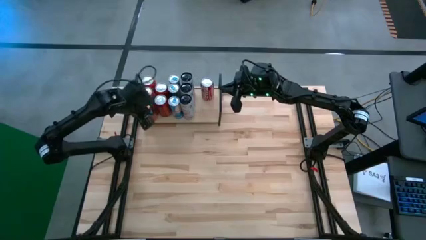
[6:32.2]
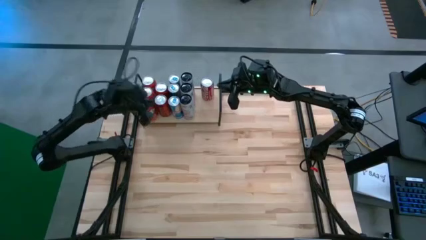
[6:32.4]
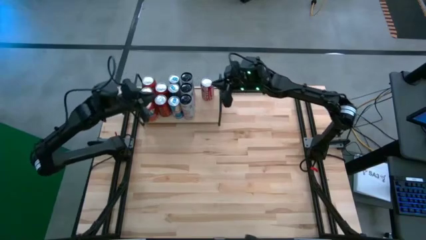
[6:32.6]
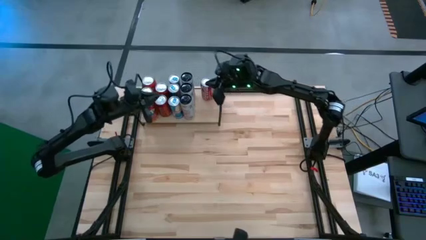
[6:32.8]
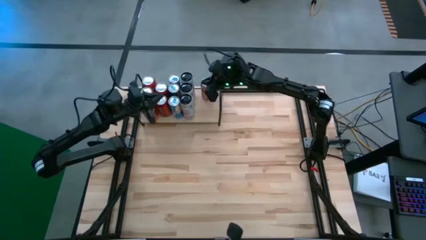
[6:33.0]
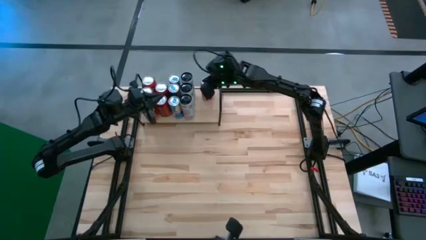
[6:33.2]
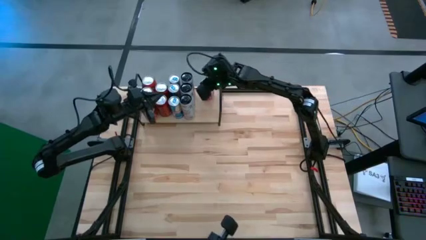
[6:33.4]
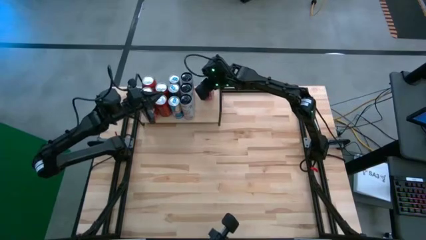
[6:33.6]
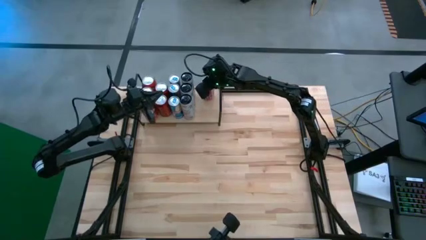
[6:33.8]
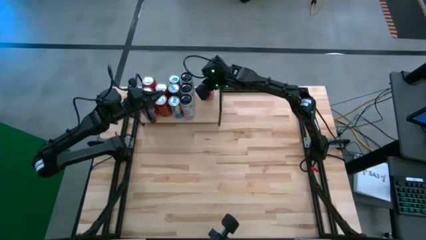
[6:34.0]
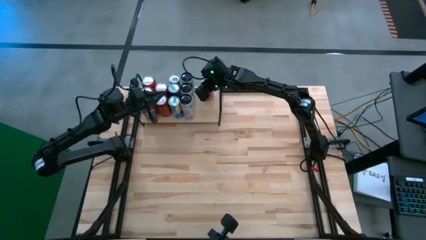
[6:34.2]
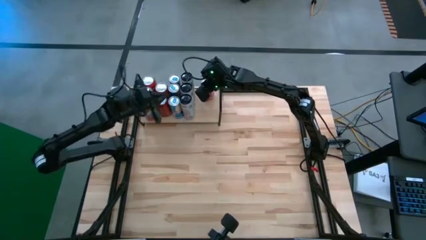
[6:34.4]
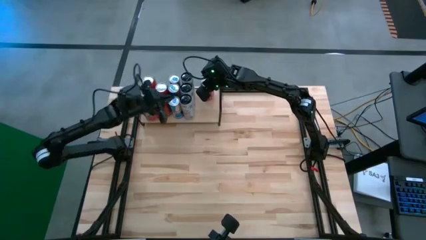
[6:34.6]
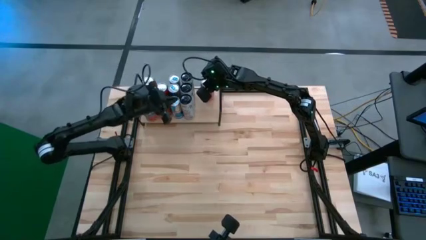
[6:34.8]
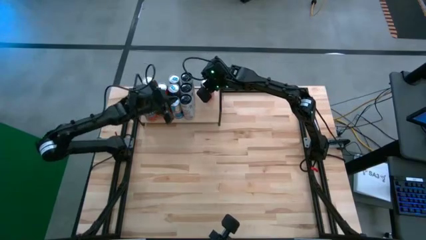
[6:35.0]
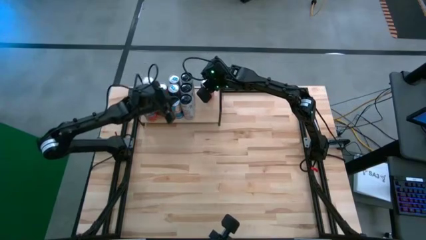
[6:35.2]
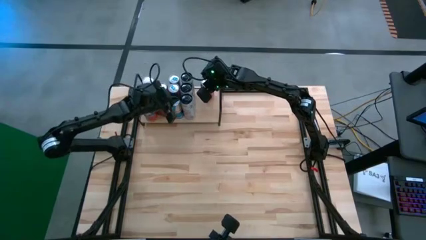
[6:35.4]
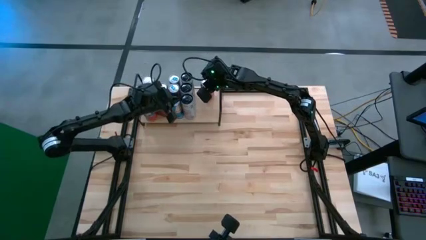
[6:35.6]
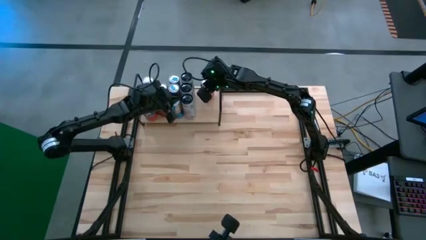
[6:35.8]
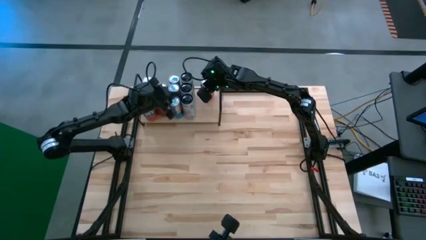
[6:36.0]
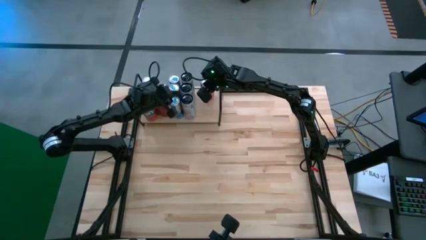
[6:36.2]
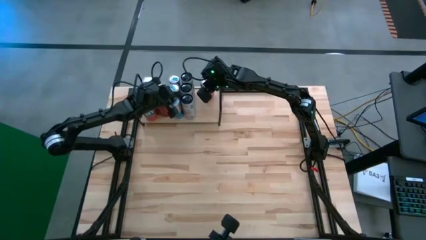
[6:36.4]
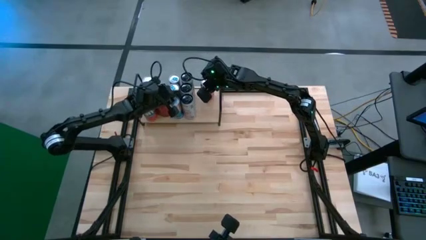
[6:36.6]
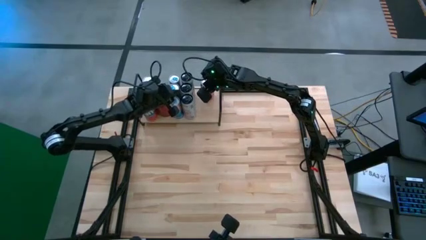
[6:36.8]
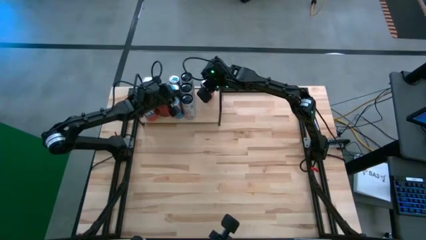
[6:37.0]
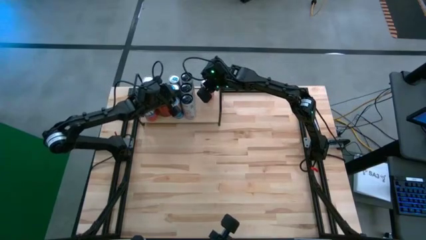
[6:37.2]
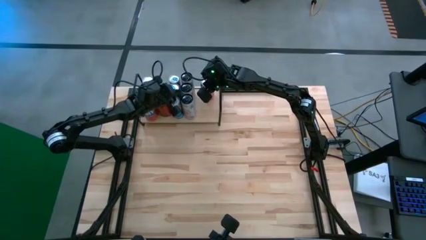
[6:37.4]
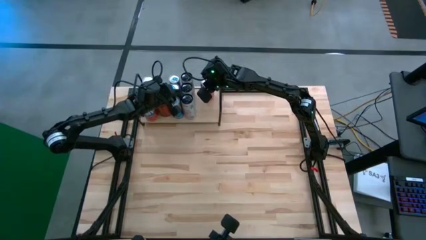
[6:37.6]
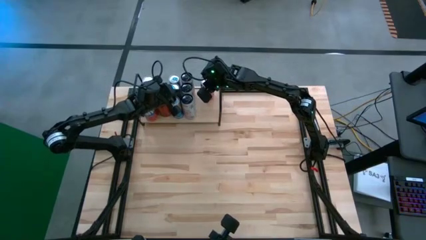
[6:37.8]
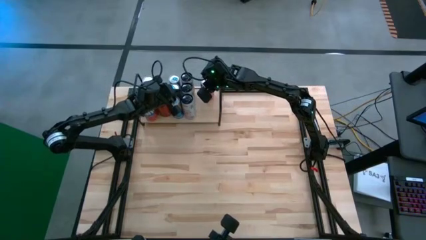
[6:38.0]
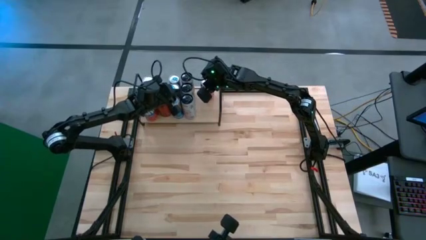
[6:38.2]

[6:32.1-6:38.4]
Task: Place canned beverage on shelf
Adjust the white pink soda cans on the shelf

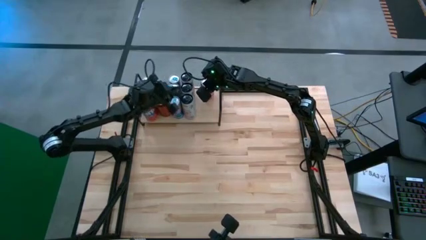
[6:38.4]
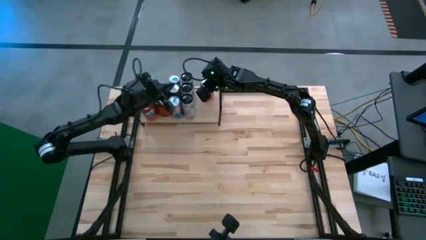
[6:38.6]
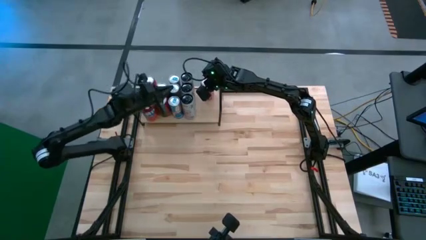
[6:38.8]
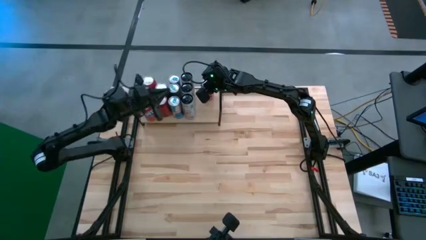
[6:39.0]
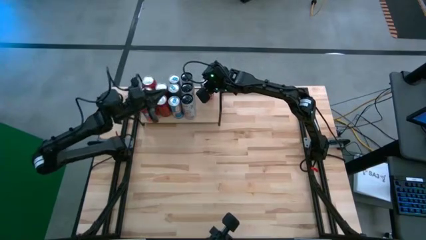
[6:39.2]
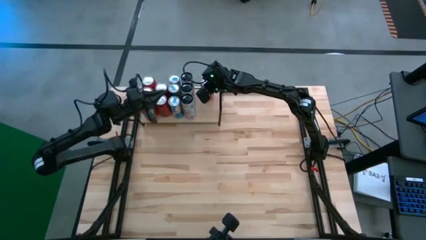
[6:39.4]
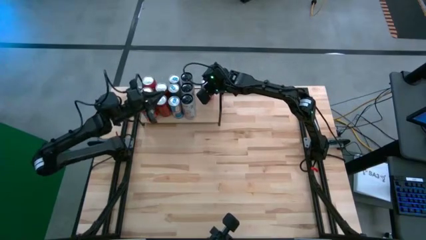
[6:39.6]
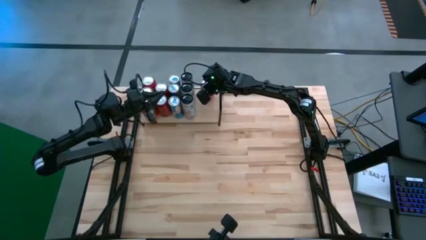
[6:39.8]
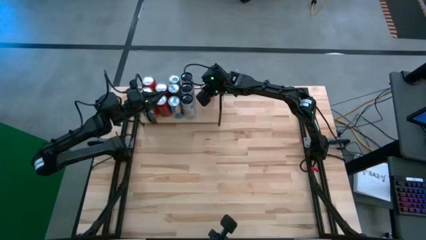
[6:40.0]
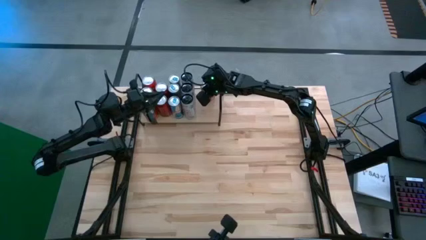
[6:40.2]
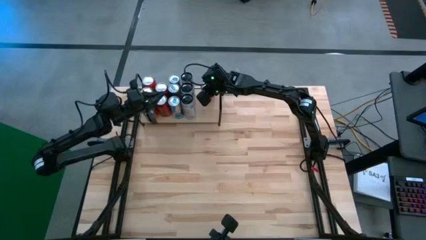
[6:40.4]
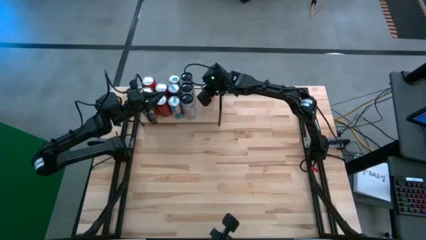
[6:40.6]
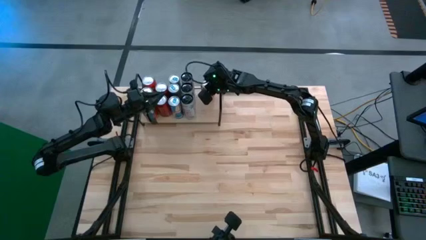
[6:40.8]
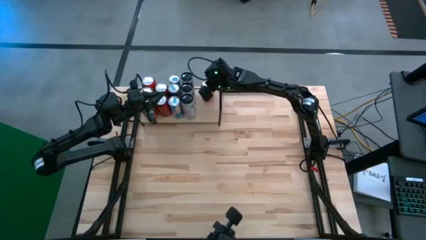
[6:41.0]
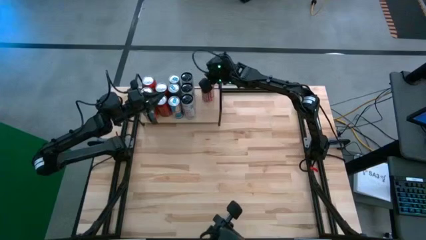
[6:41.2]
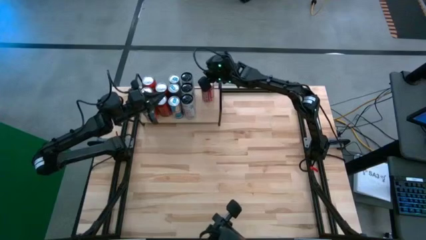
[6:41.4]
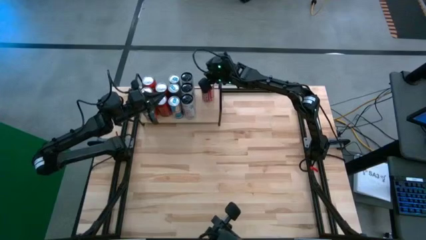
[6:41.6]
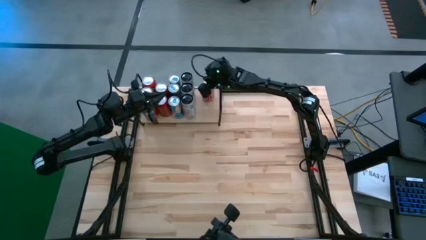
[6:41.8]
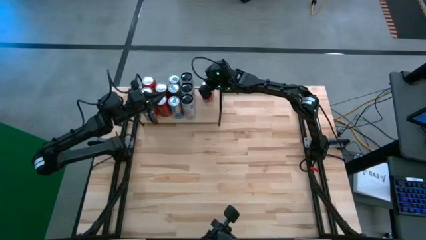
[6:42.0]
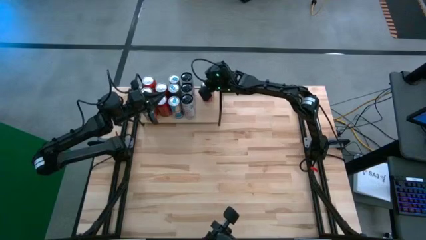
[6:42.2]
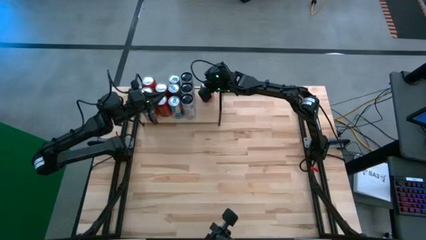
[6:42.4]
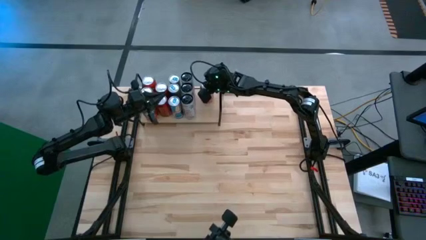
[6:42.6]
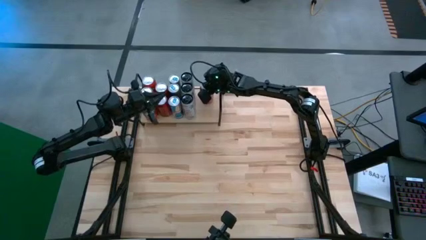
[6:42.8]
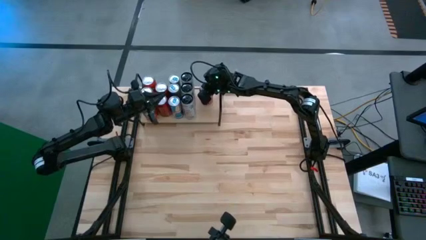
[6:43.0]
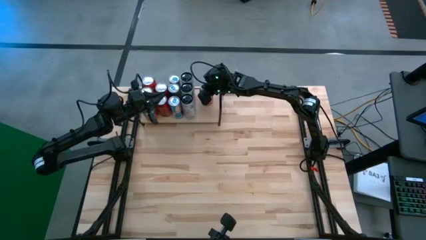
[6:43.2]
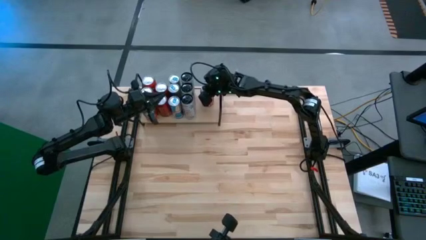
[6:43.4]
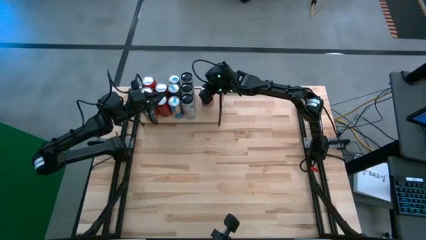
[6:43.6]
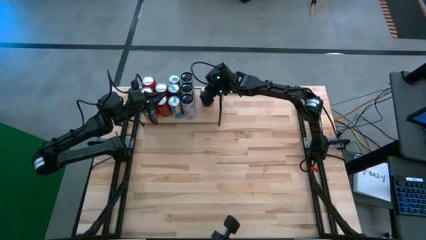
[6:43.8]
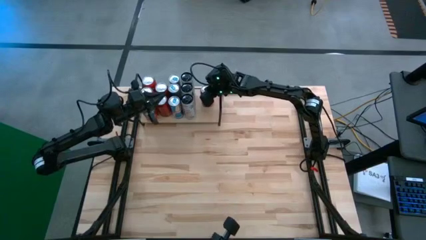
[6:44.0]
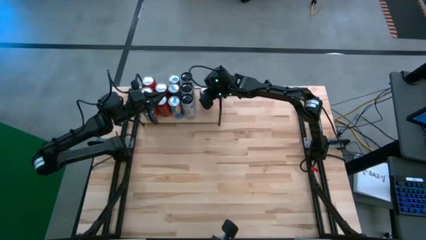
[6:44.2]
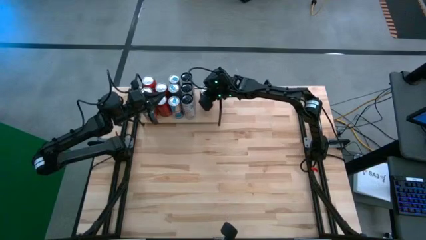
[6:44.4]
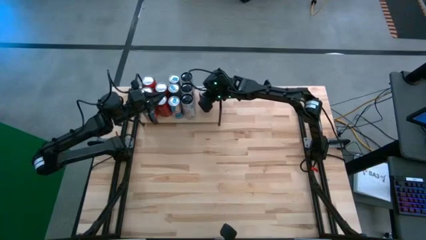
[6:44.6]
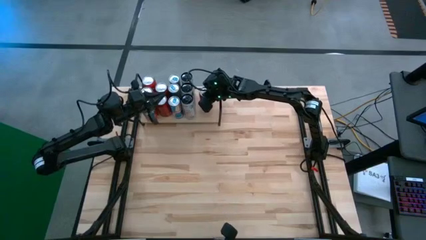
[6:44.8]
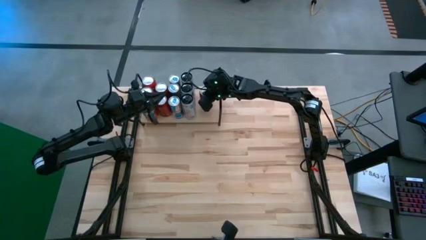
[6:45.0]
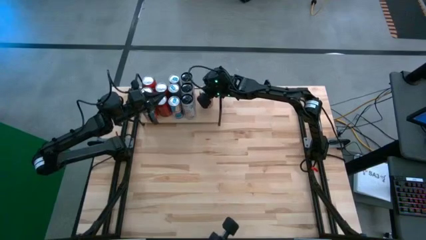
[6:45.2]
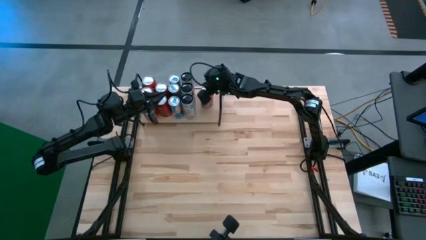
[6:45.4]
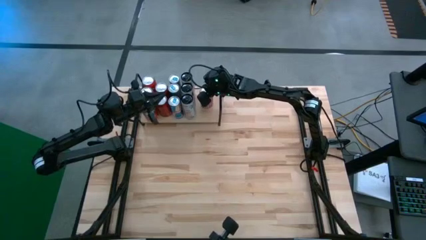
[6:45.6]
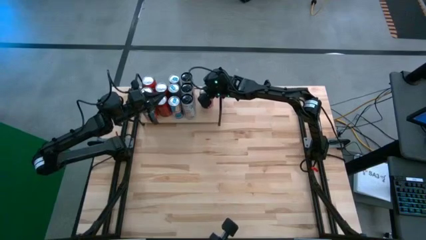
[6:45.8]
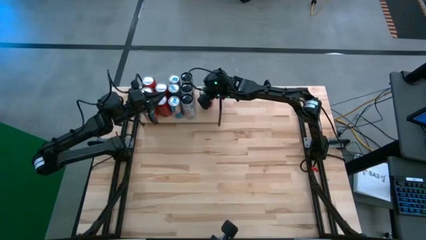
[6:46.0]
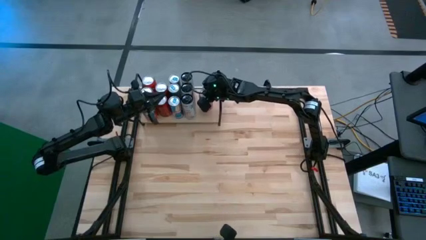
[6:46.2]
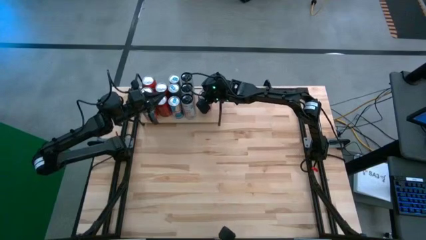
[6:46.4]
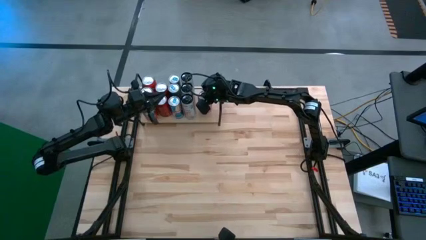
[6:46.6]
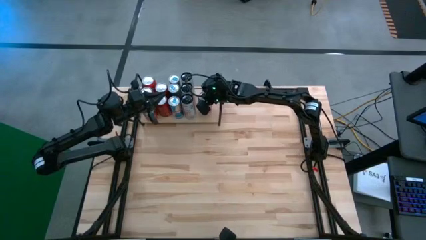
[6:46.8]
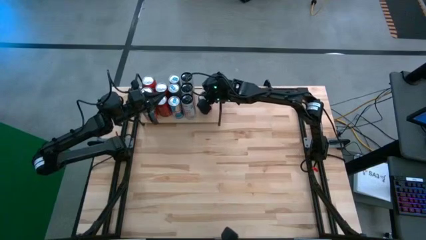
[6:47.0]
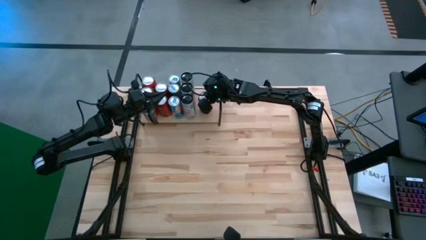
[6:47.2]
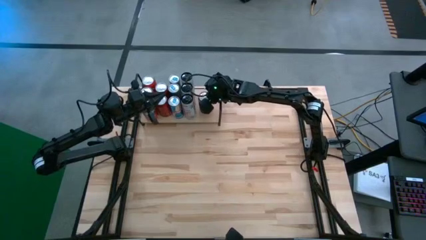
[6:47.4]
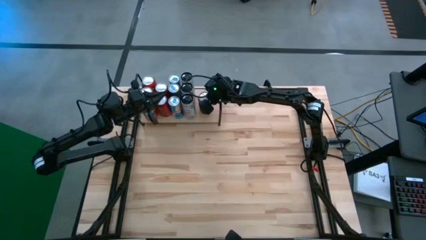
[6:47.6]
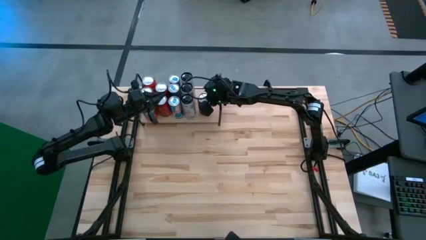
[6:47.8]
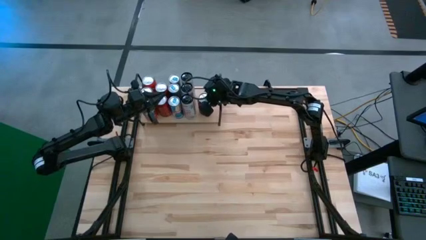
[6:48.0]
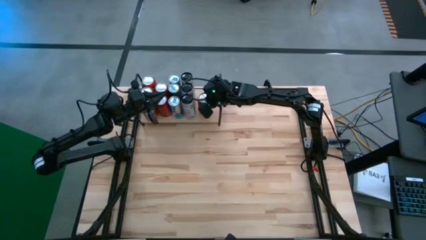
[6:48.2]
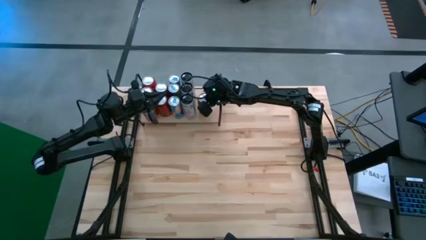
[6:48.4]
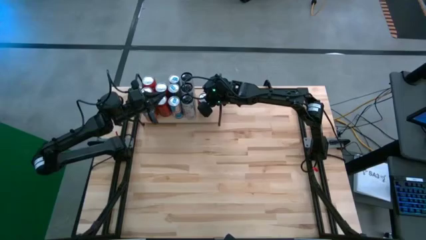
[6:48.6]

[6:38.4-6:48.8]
Adjust the red white soda can on the shelf
